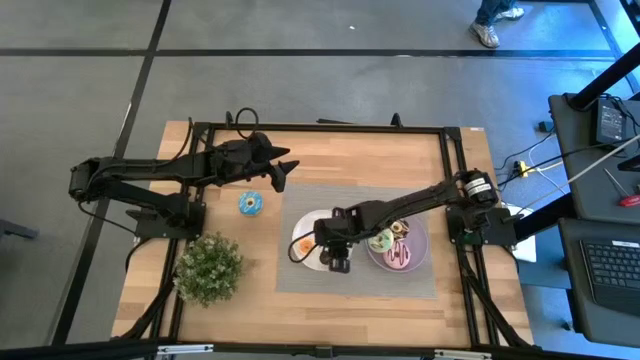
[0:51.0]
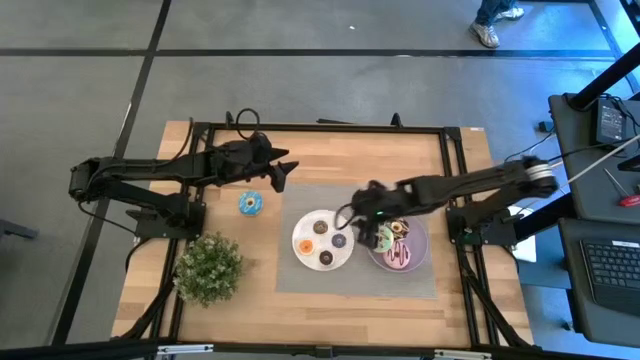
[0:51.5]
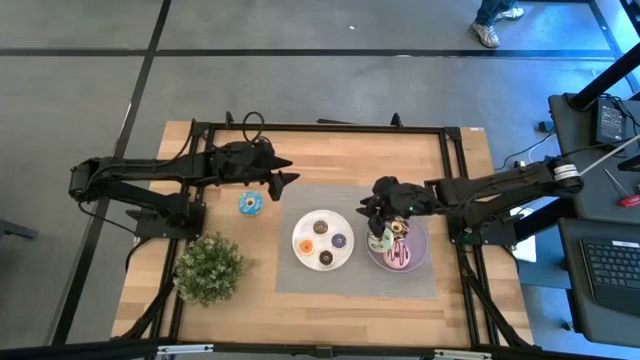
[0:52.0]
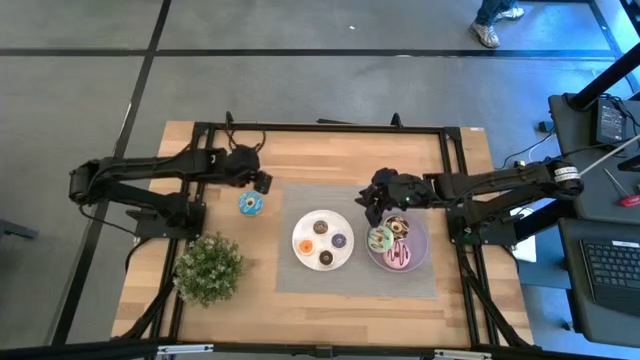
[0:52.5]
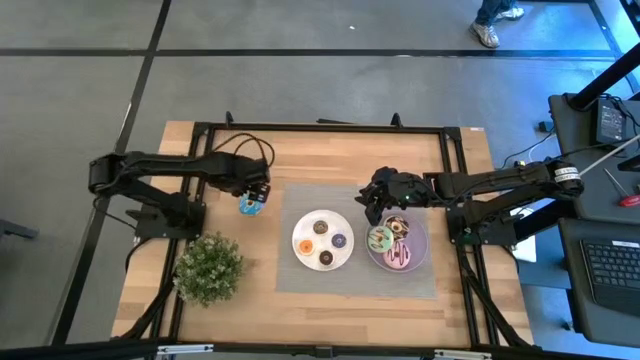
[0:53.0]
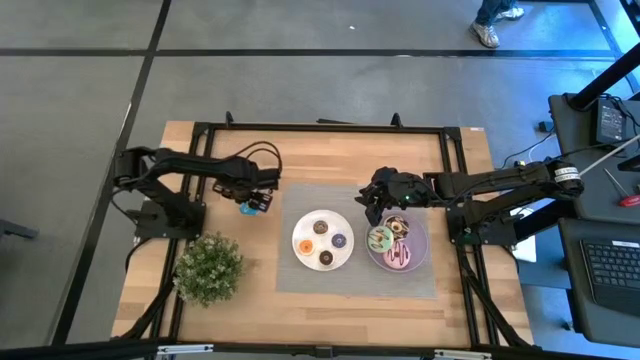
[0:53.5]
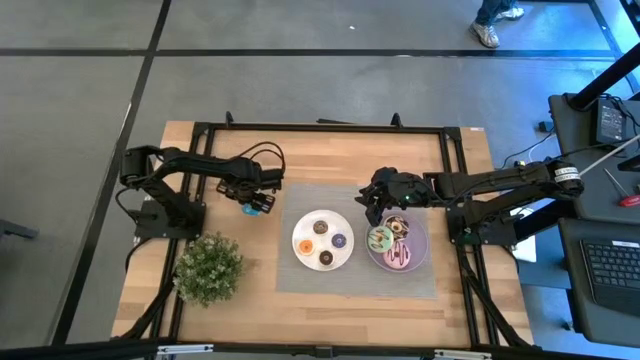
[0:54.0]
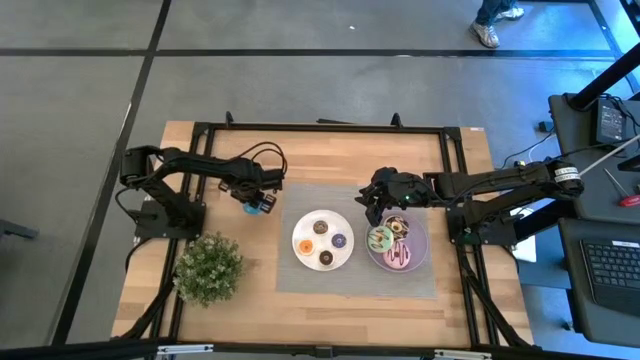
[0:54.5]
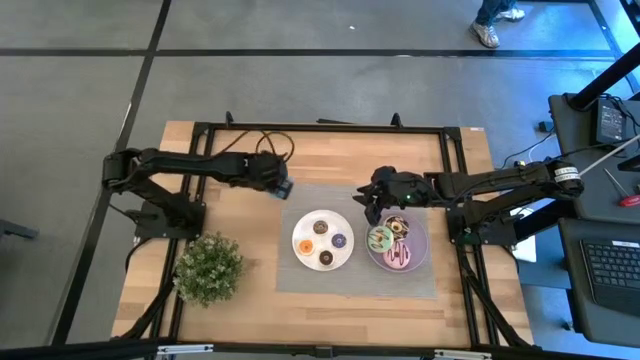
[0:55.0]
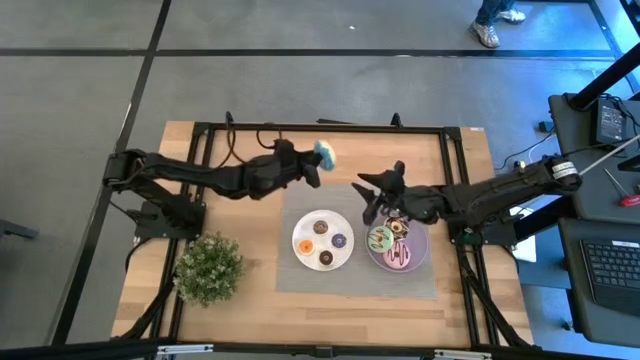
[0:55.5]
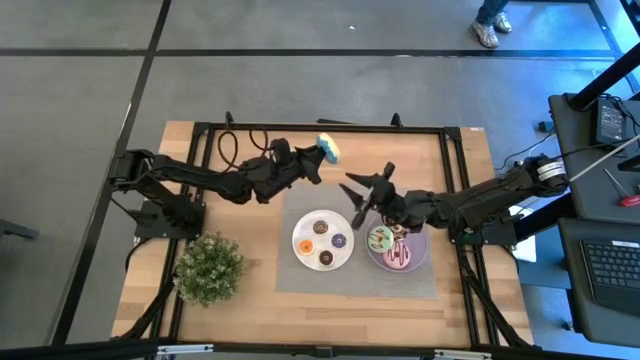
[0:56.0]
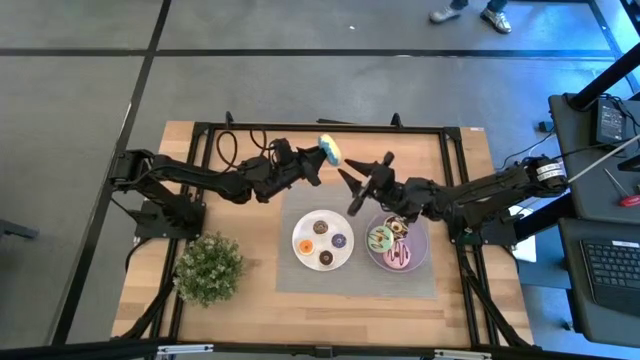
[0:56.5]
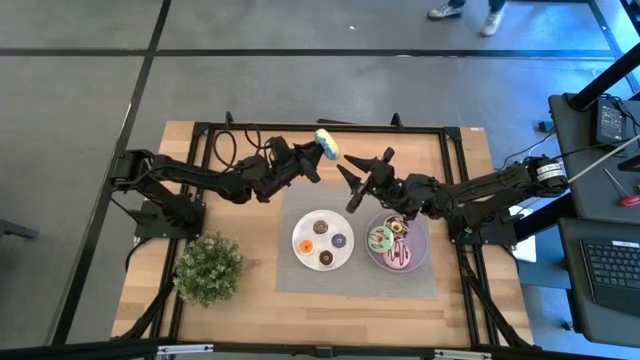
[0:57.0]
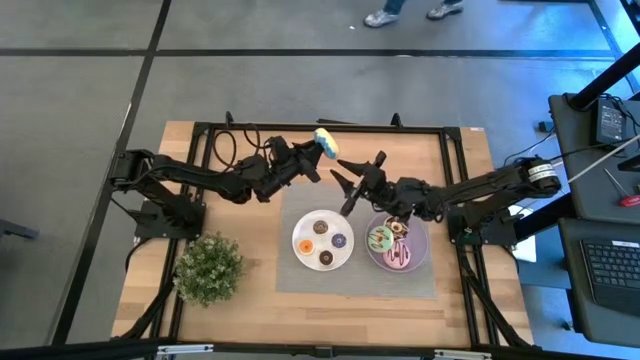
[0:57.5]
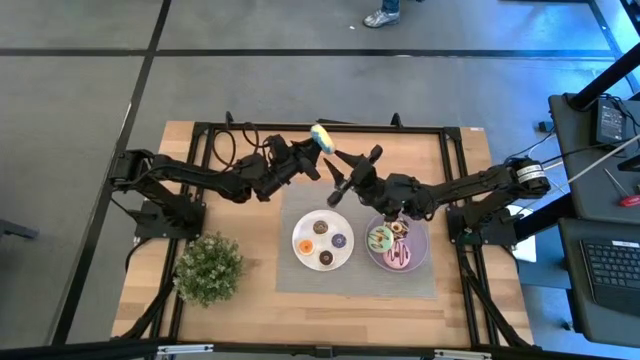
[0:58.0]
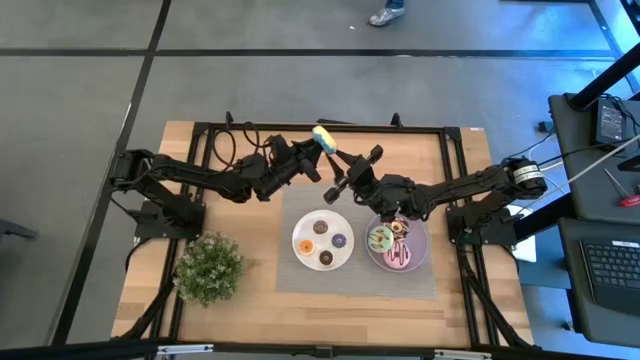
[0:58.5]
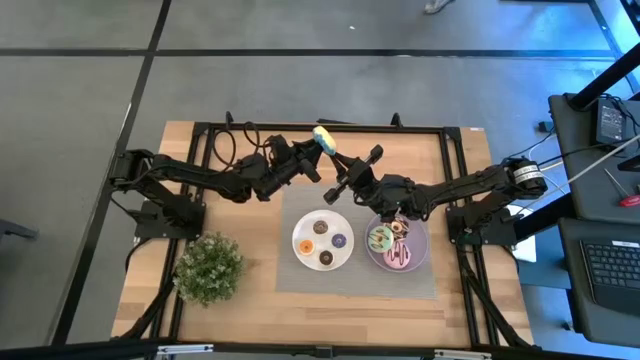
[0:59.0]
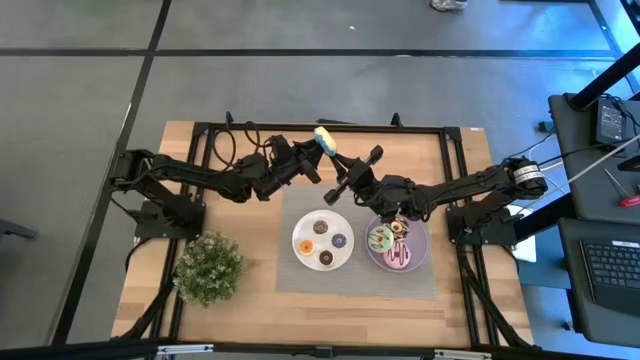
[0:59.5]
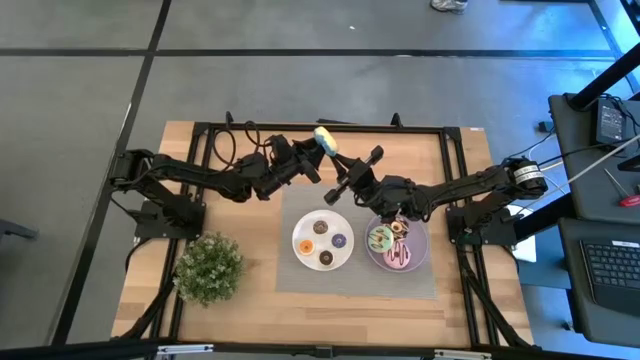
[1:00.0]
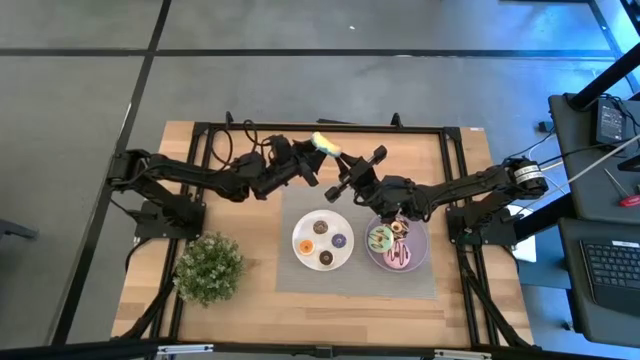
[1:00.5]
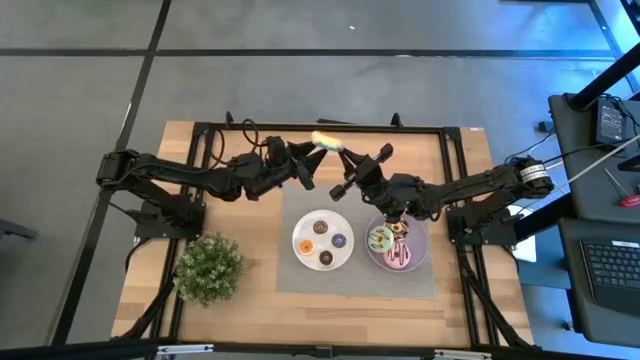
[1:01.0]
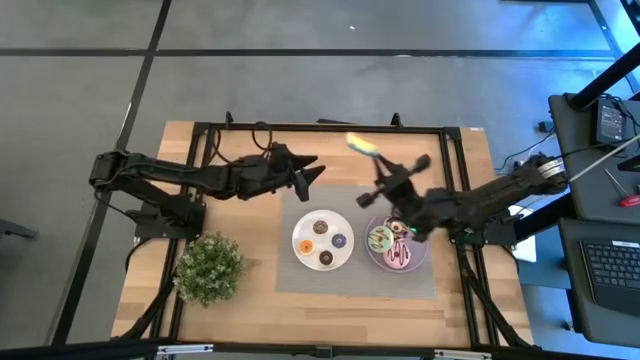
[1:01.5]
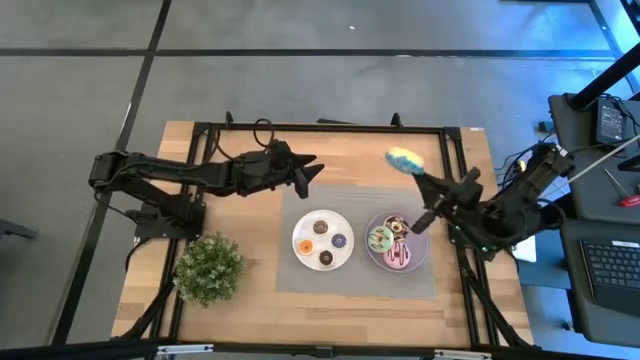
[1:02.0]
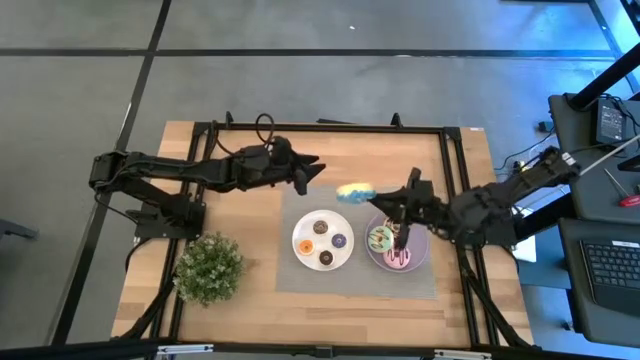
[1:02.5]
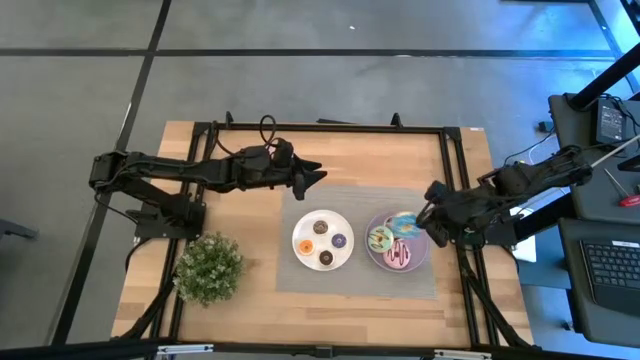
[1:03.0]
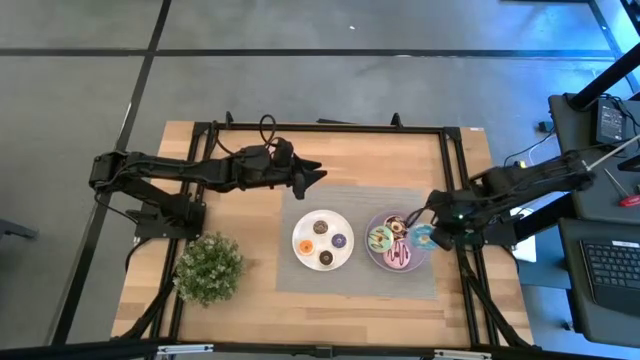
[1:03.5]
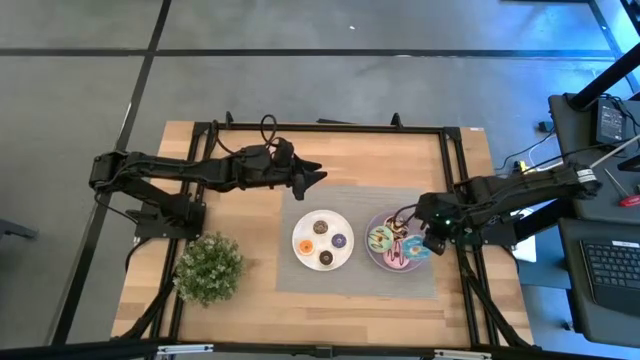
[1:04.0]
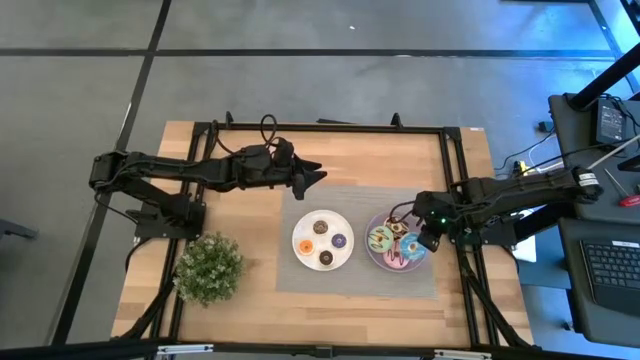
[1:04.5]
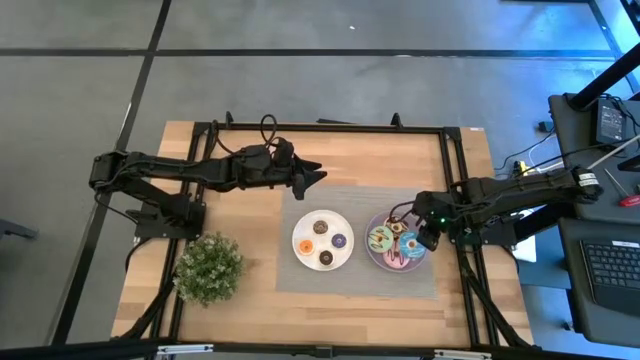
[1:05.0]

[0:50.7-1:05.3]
Task: Pick & Place donuts
Put the large blue donut on the purple plate

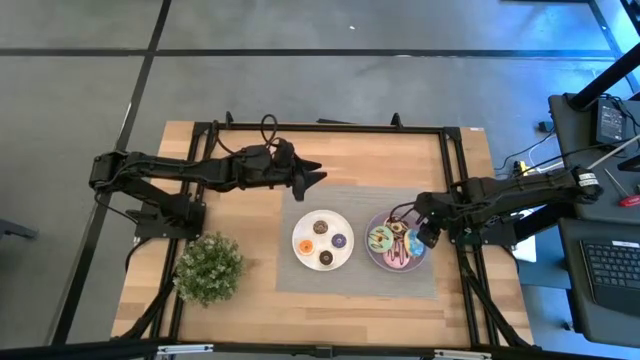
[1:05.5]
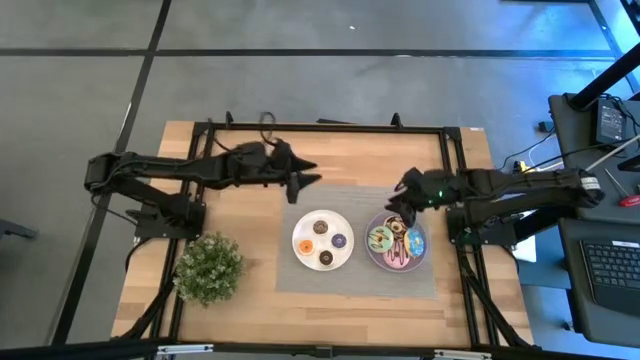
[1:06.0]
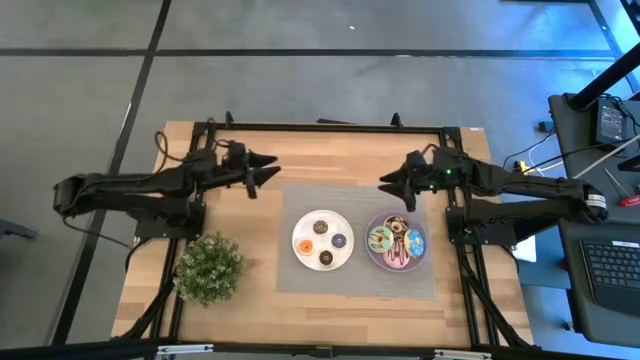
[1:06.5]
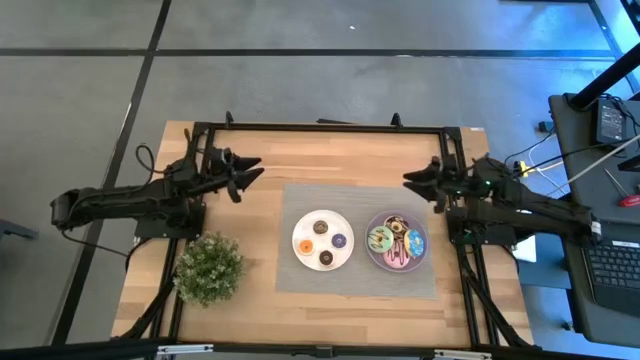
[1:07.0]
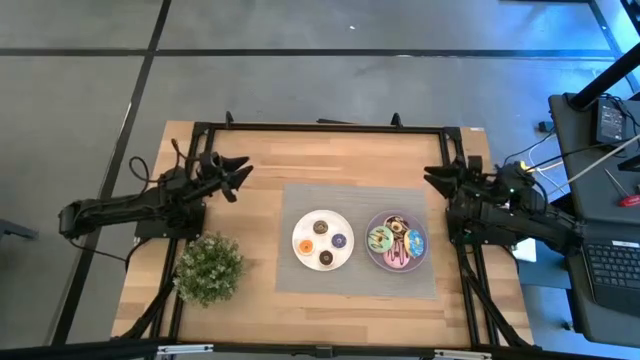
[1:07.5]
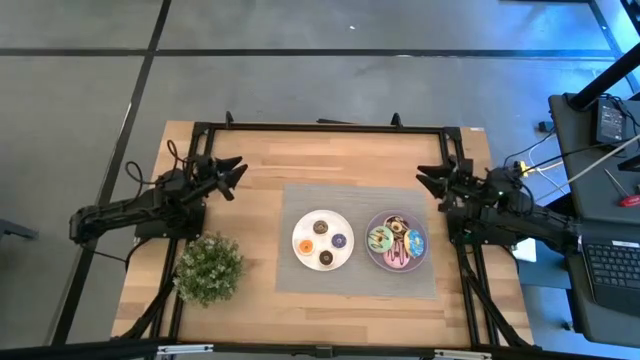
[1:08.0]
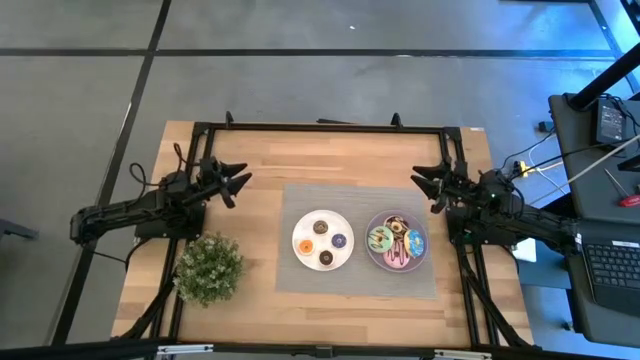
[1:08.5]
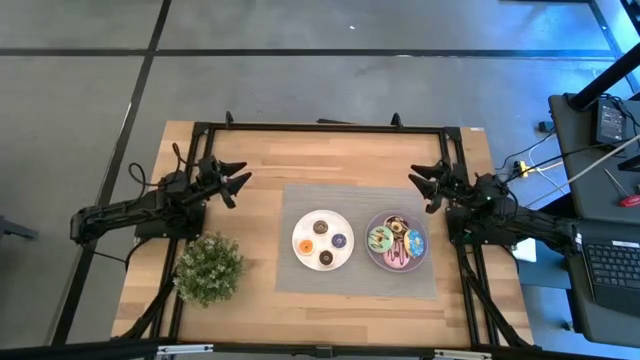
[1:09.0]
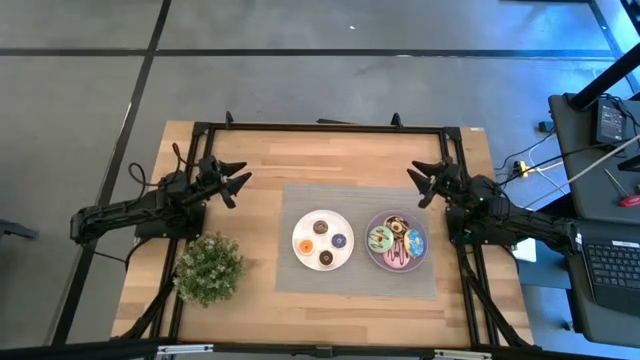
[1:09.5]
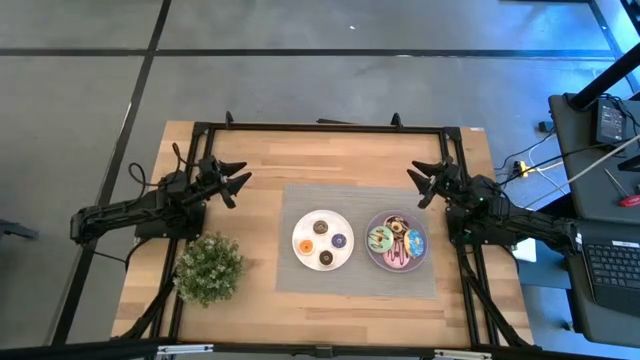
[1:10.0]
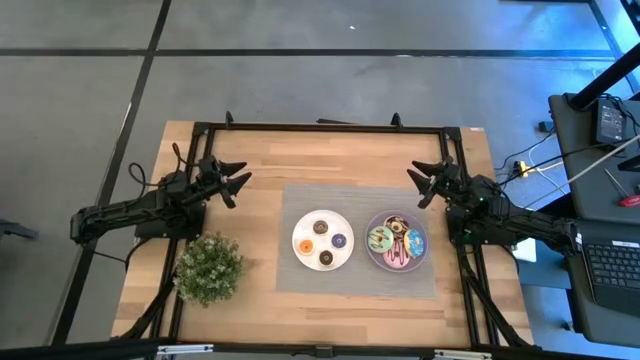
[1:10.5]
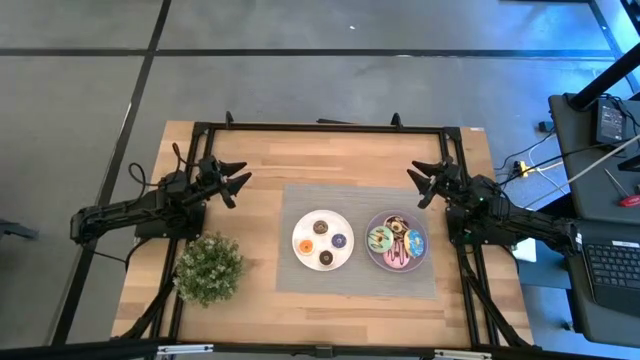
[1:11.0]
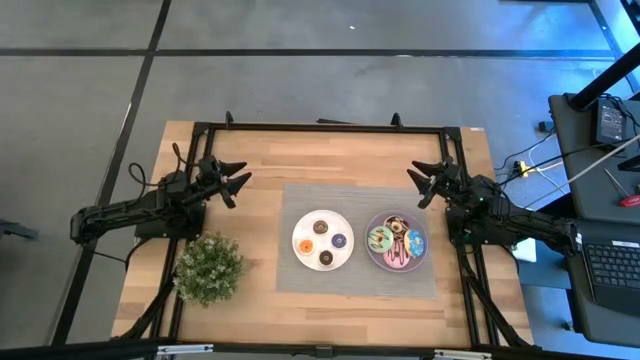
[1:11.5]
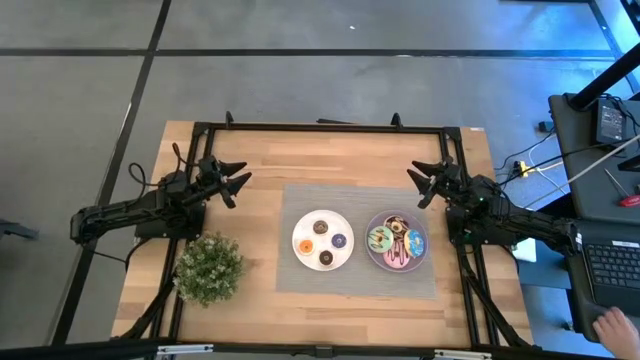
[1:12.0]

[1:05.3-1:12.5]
Return to Home Position
